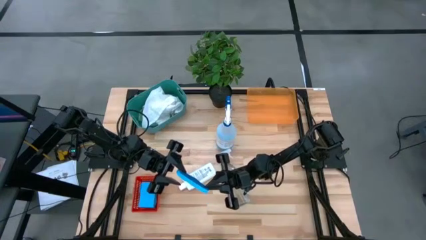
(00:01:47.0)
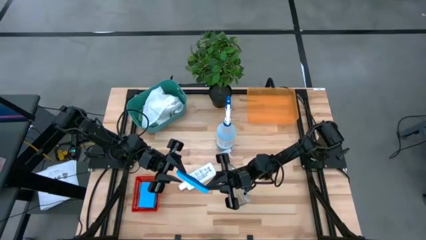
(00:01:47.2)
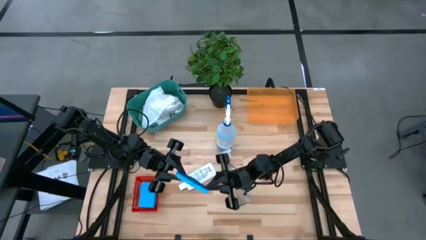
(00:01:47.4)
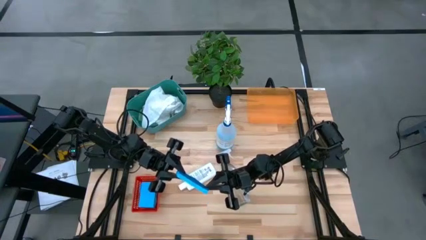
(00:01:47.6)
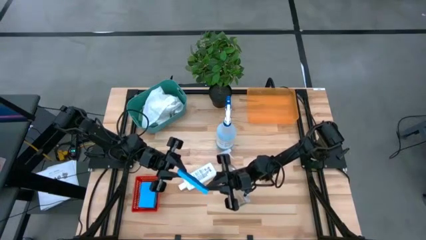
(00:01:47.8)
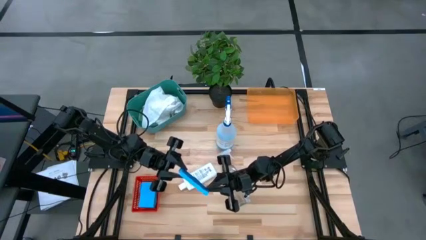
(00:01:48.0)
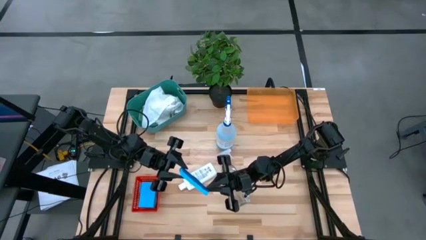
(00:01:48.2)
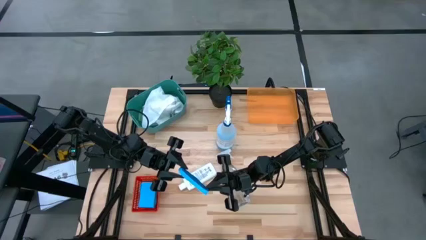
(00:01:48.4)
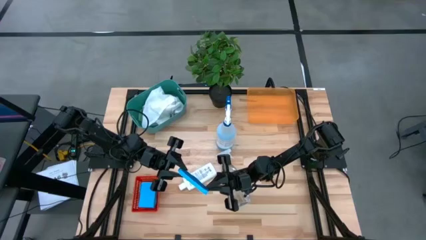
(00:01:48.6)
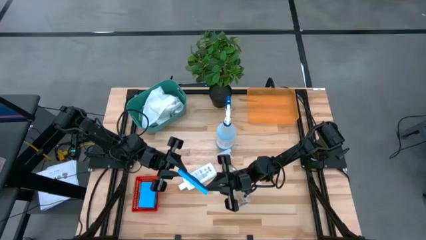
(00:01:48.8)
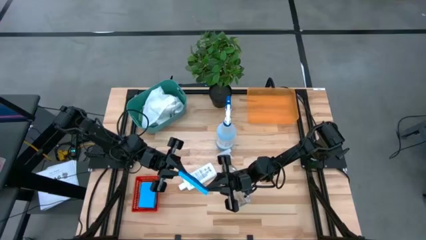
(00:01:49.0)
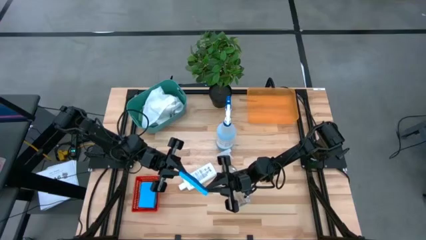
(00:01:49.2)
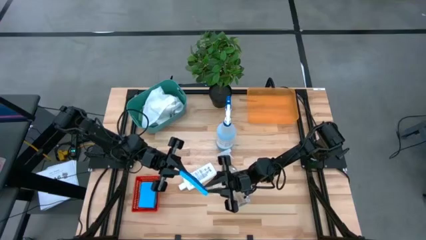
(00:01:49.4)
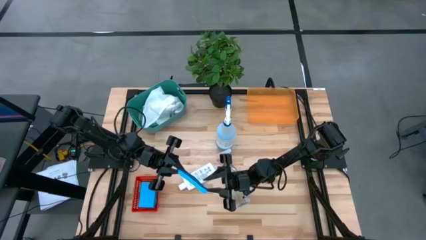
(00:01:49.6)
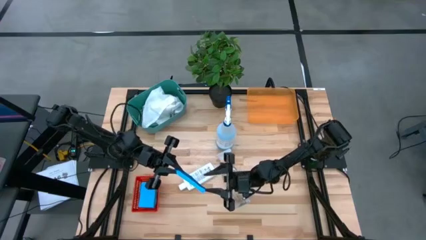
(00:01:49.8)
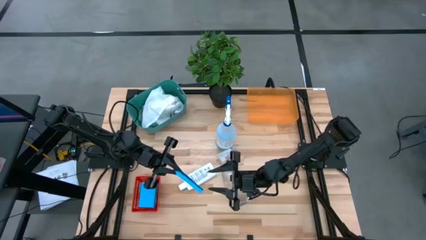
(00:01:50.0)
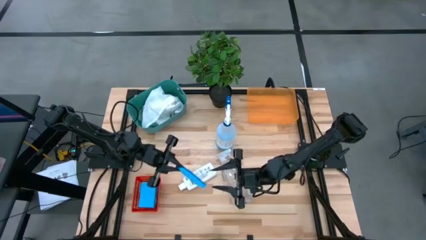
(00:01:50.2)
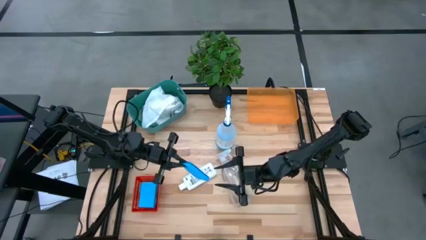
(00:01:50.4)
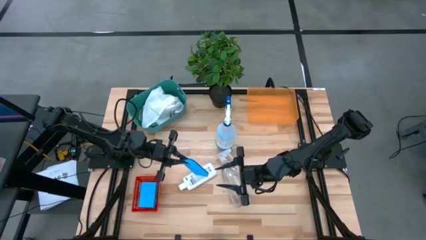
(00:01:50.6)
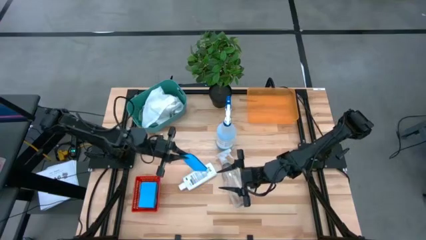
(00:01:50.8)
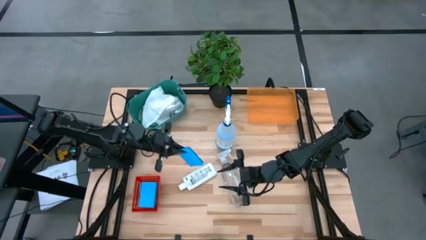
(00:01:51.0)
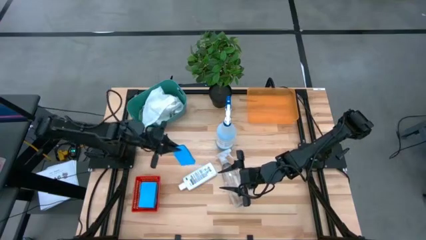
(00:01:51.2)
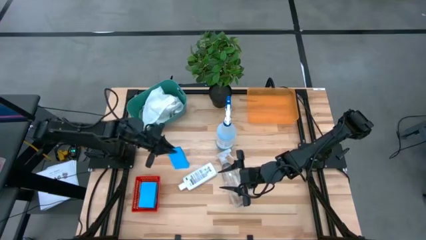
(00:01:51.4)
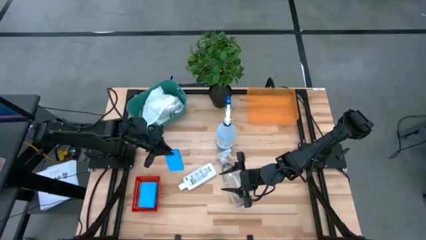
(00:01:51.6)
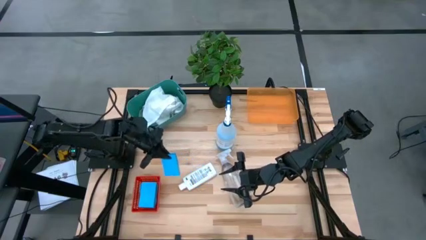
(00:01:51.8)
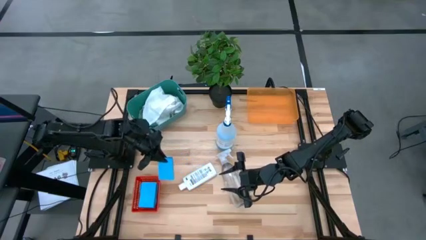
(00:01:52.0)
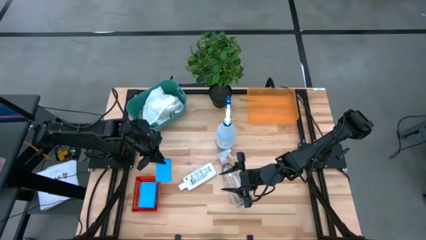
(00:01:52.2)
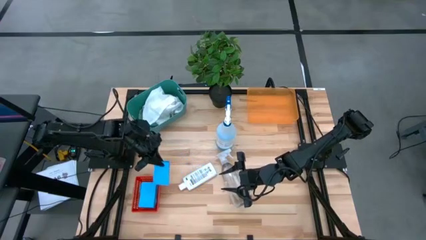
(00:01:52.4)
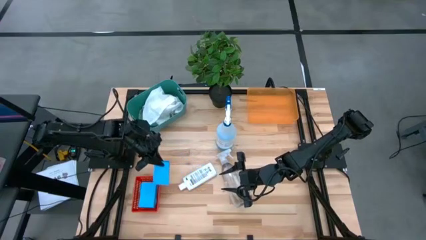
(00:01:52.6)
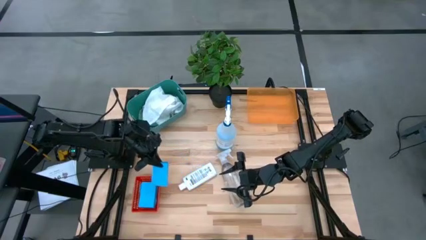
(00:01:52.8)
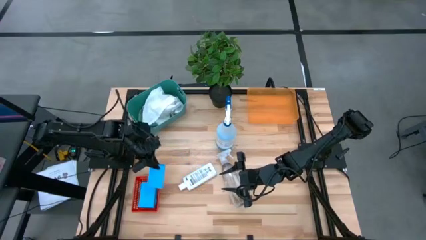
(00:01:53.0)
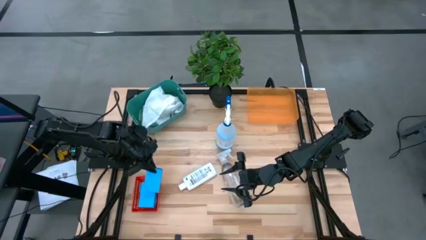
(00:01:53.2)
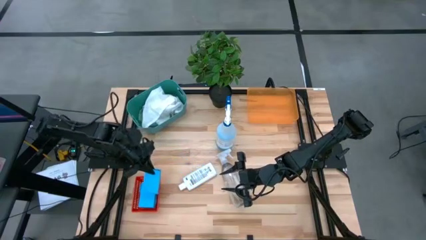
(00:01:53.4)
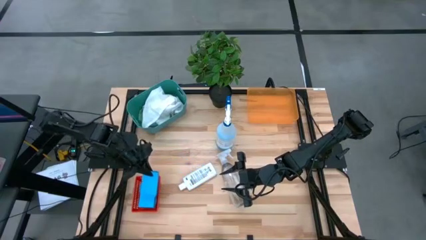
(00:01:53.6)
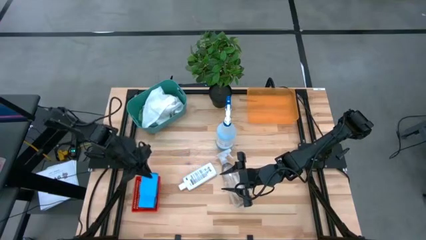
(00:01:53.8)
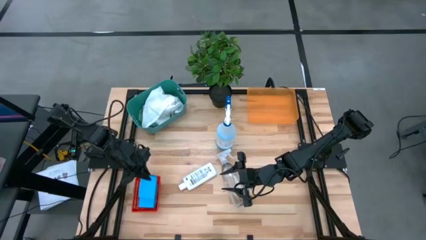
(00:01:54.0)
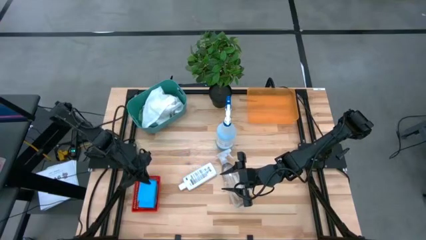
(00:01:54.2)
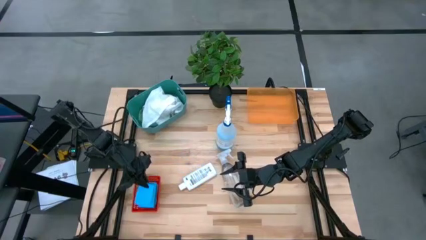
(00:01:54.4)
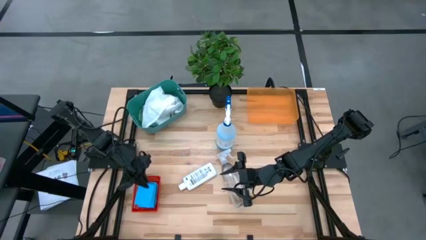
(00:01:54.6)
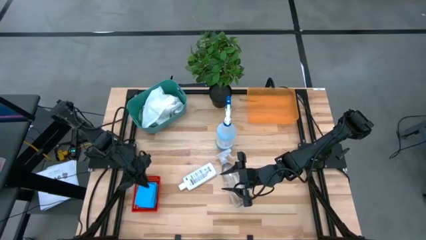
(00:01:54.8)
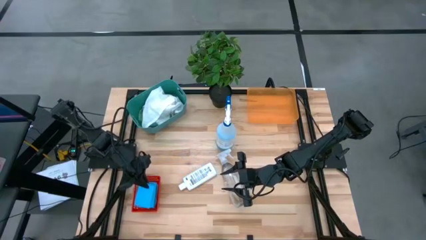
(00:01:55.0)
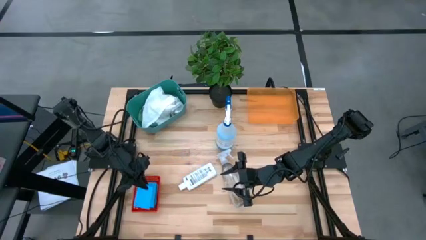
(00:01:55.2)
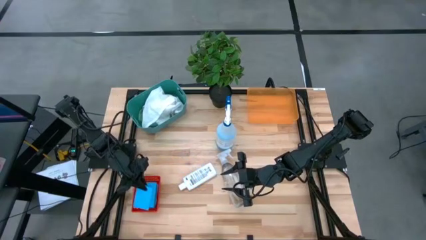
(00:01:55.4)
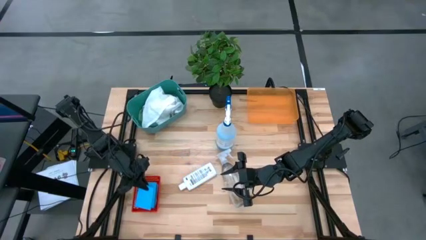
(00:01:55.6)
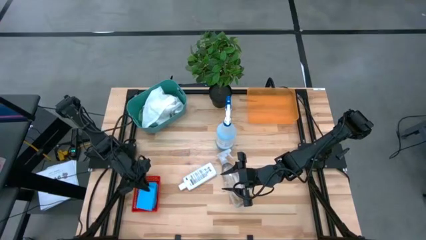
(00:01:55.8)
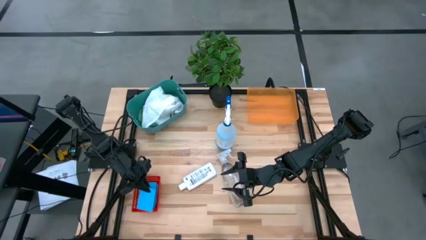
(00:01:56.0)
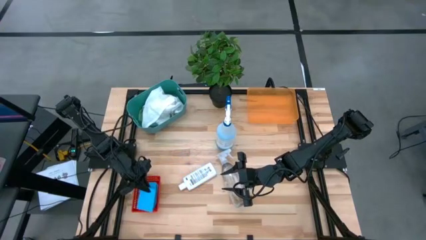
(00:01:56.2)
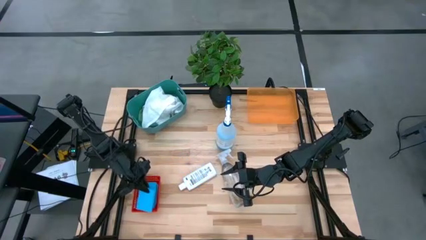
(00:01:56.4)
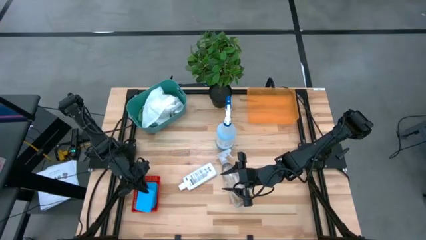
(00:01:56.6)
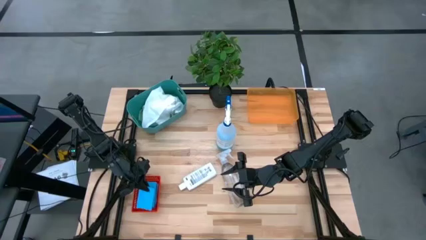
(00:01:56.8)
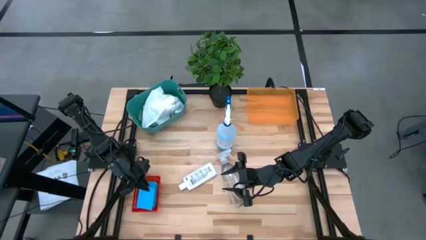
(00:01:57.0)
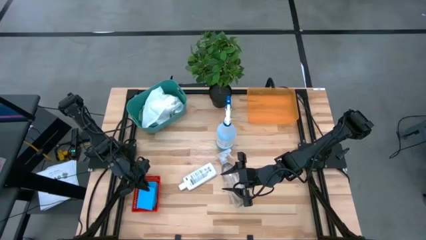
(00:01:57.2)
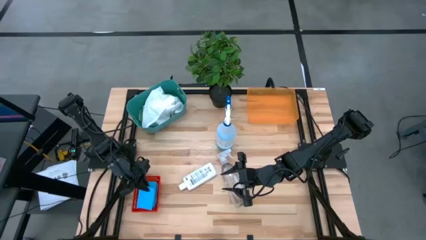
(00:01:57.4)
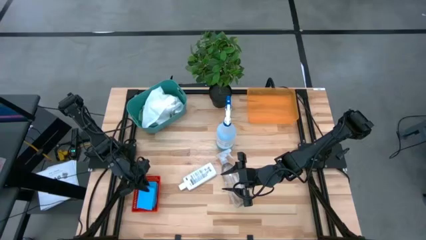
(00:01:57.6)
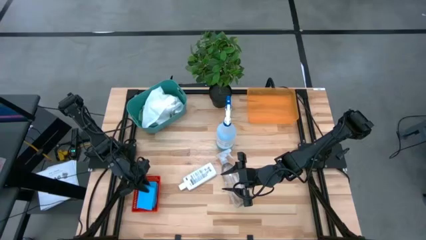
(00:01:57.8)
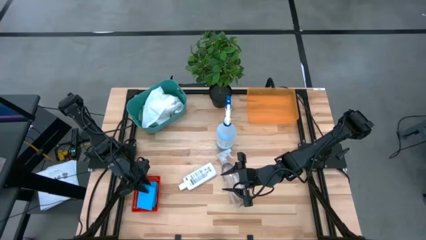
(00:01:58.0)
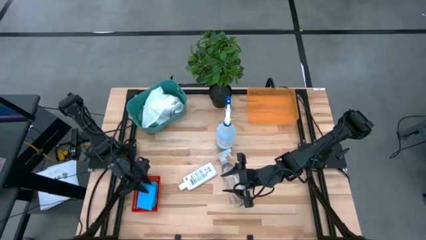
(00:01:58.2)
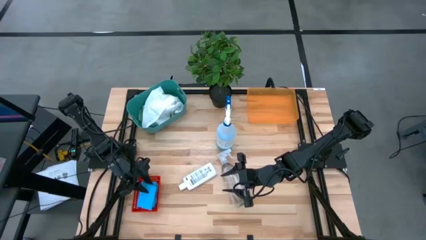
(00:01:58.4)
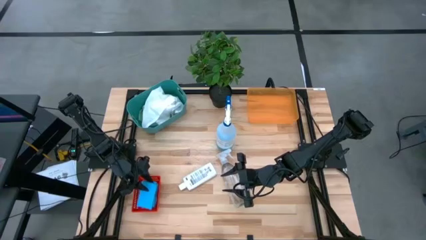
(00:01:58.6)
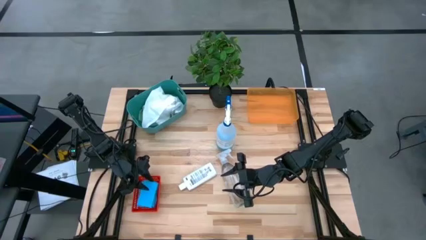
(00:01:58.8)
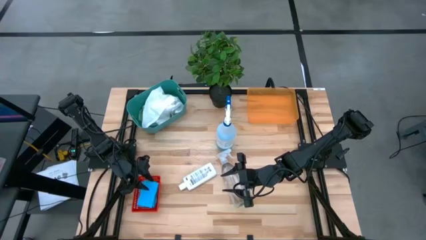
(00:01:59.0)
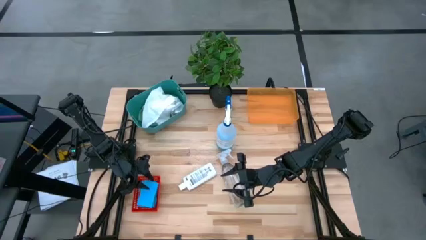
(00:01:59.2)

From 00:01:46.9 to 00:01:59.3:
Task: Pick & Place Kitchen Items
Put the blue sponge into the red bin

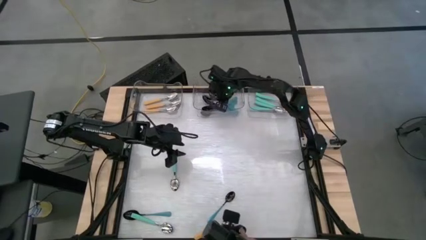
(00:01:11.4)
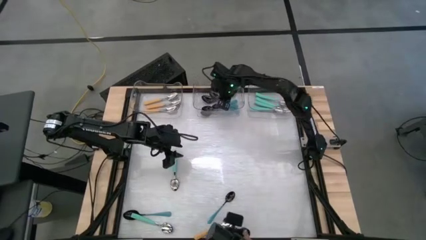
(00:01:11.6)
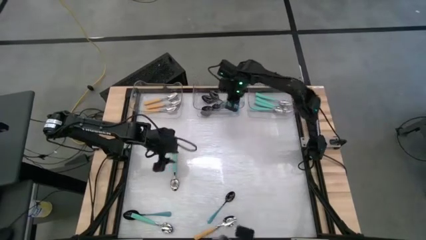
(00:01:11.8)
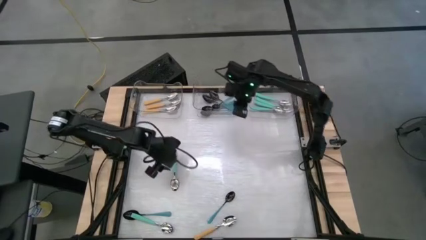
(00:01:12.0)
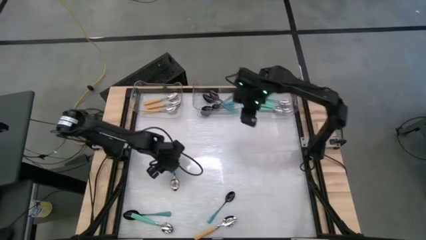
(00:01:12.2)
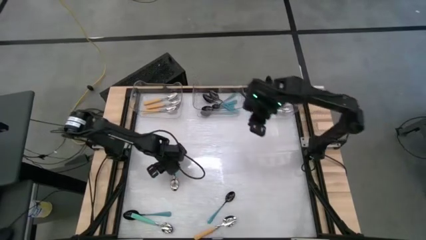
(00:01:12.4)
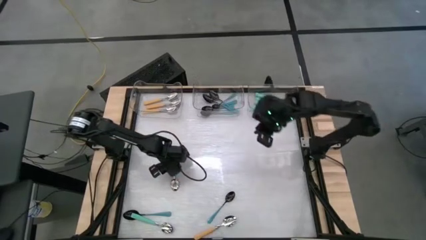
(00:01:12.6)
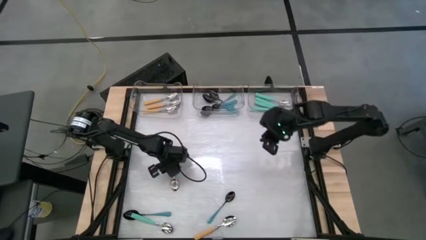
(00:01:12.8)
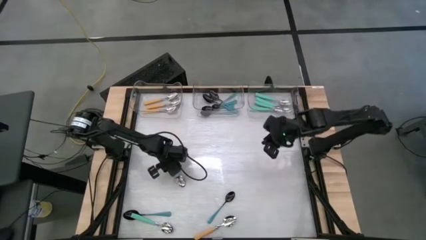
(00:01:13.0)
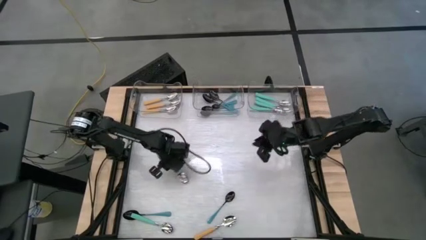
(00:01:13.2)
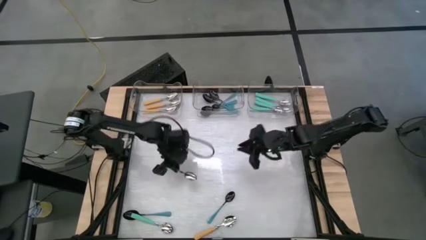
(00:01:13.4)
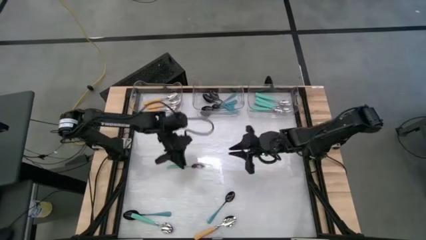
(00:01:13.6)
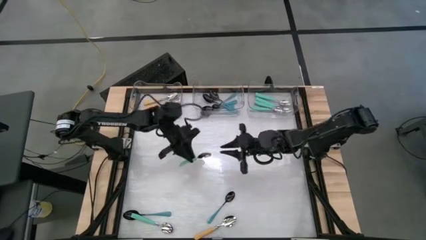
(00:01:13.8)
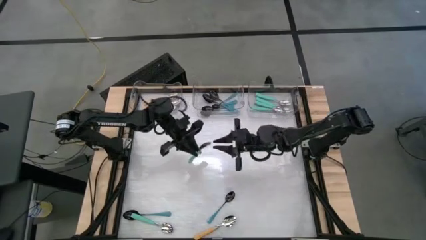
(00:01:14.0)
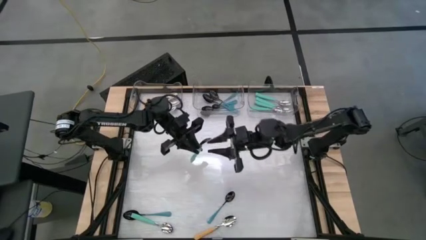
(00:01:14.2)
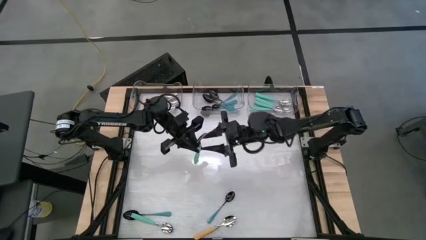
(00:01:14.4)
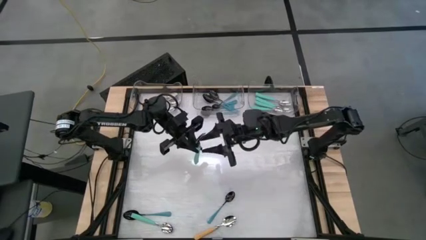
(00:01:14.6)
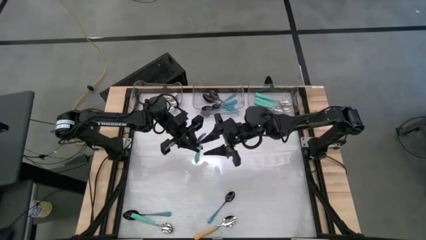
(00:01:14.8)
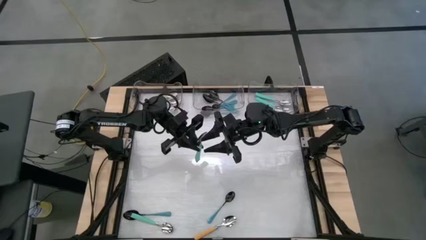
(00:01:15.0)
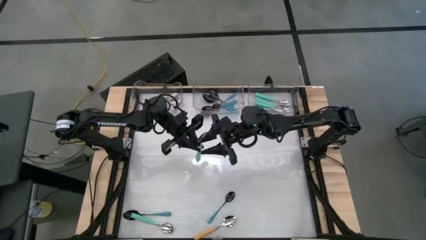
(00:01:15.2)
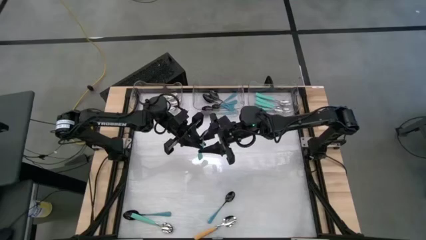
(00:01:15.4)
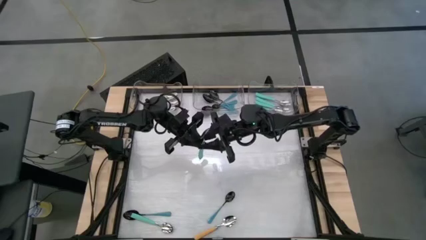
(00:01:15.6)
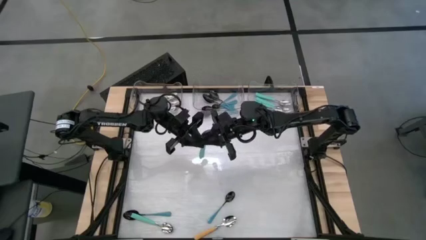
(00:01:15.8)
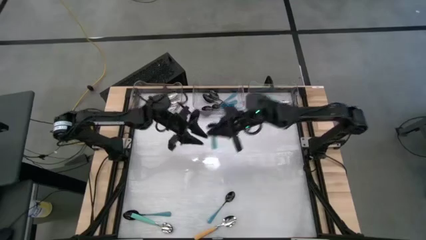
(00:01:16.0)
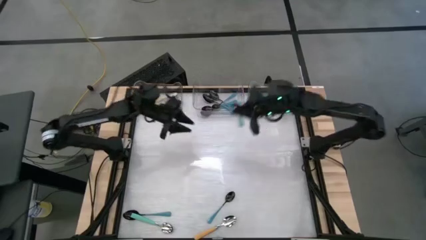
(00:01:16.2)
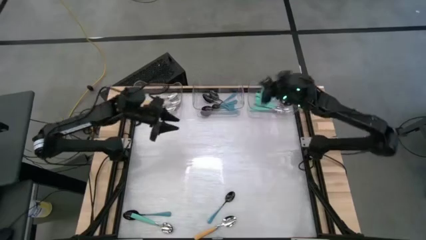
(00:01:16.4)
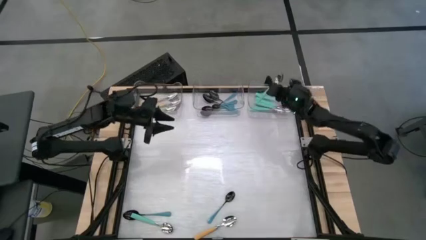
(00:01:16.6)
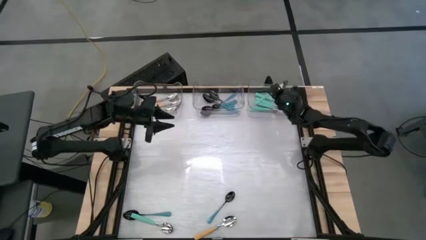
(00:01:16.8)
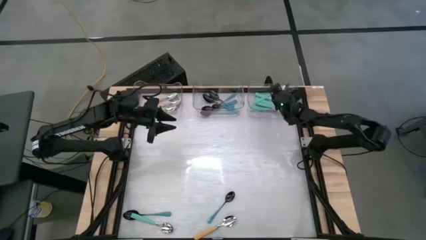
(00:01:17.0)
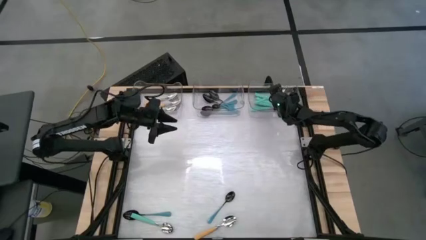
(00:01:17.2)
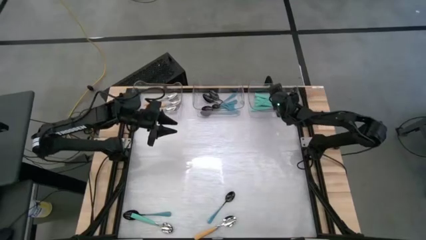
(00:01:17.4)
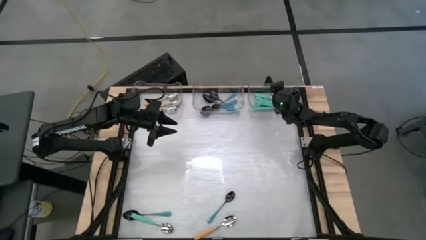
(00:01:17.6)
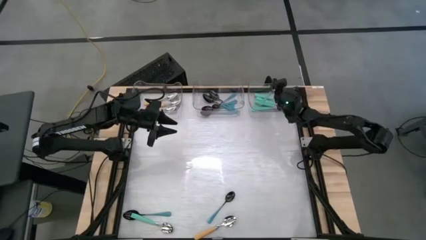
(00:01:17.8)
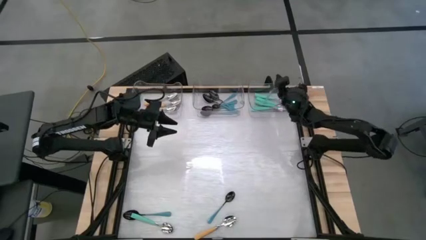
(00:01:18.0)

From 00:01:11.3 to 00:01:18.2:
Task: Sort silverware by color (type)
Put the light green spoon into the right transparent bin
